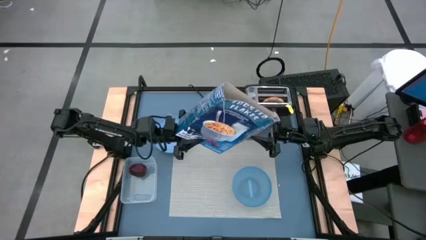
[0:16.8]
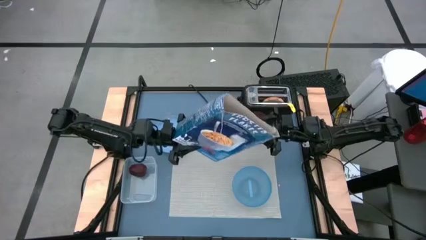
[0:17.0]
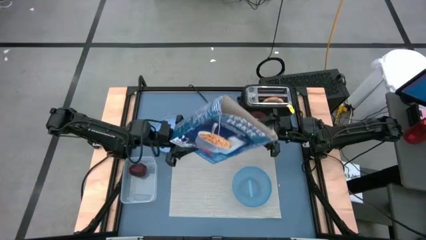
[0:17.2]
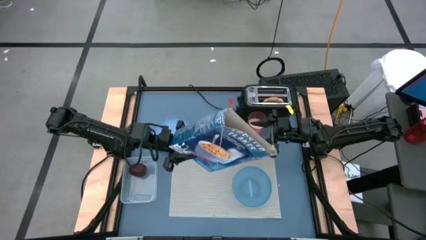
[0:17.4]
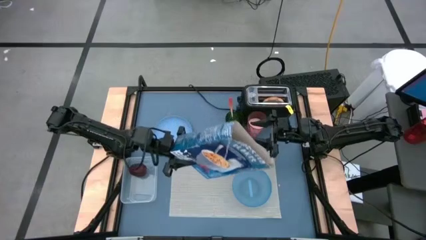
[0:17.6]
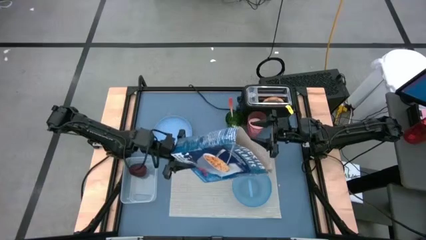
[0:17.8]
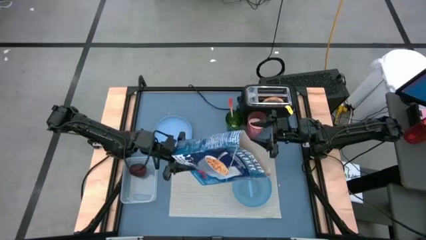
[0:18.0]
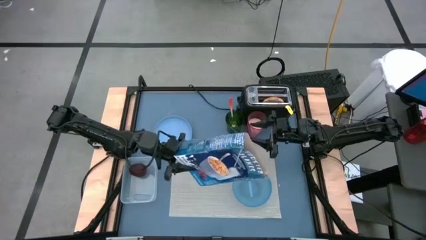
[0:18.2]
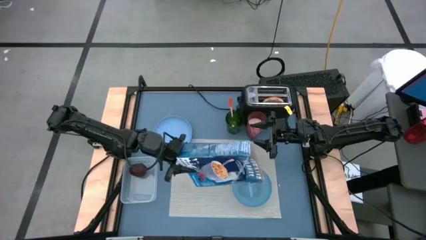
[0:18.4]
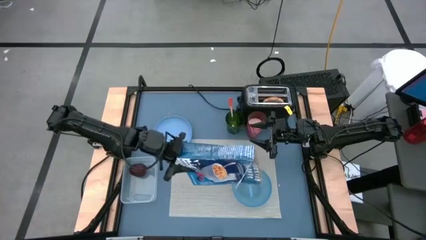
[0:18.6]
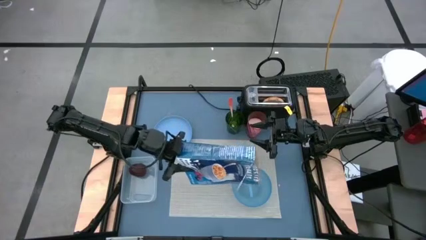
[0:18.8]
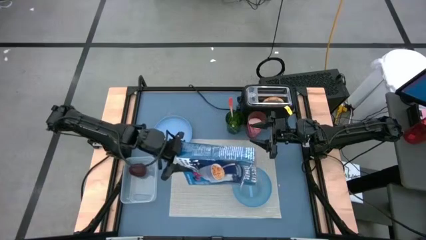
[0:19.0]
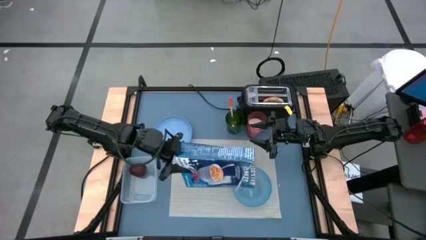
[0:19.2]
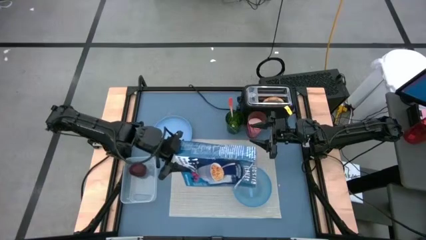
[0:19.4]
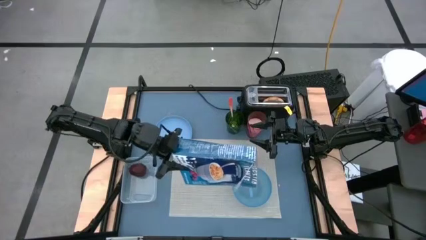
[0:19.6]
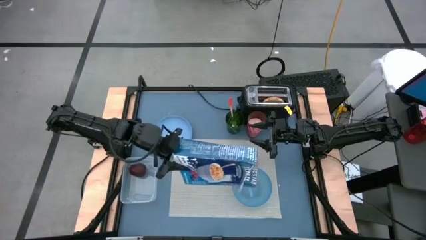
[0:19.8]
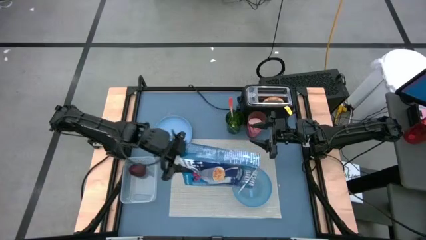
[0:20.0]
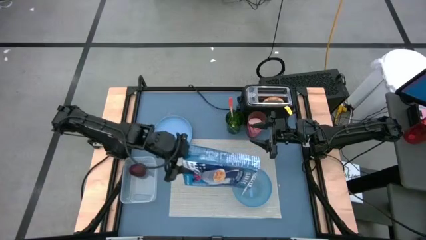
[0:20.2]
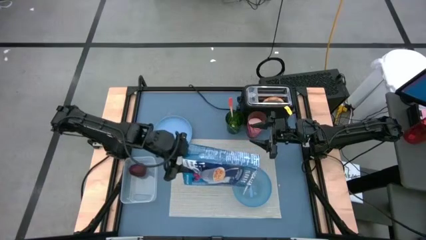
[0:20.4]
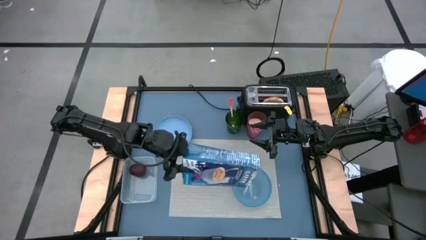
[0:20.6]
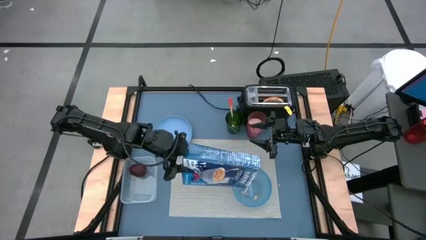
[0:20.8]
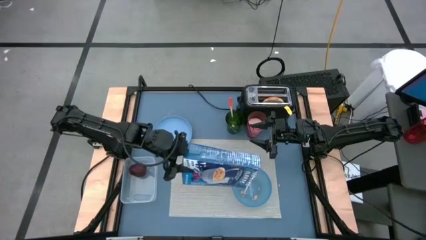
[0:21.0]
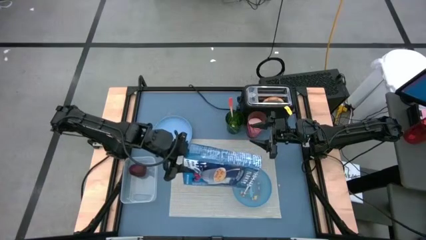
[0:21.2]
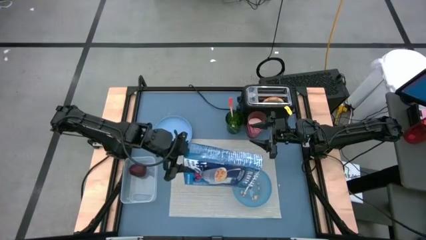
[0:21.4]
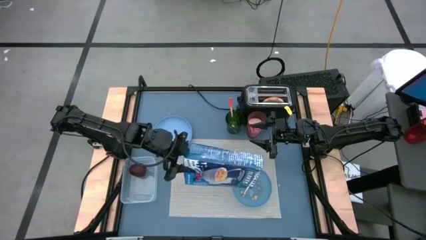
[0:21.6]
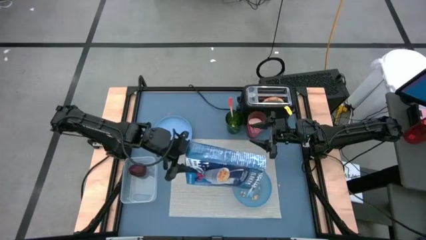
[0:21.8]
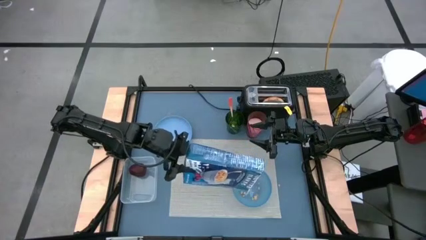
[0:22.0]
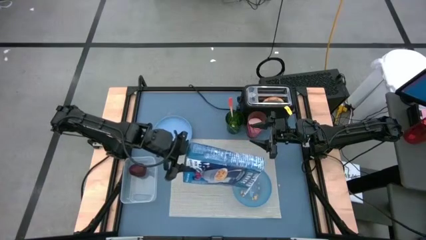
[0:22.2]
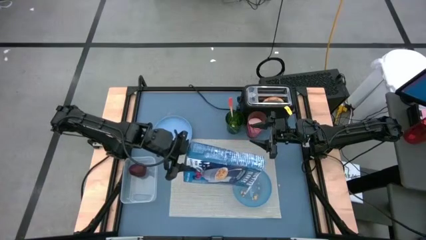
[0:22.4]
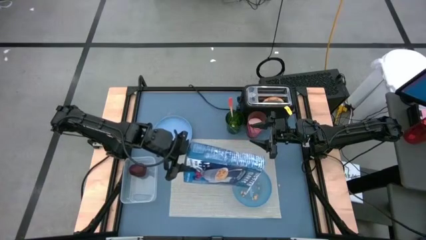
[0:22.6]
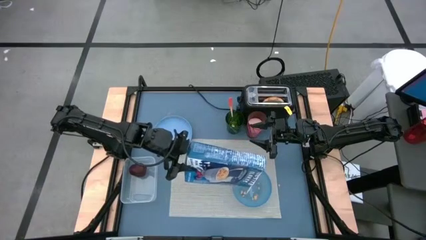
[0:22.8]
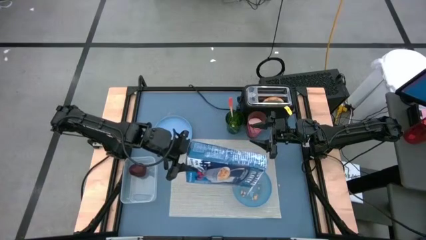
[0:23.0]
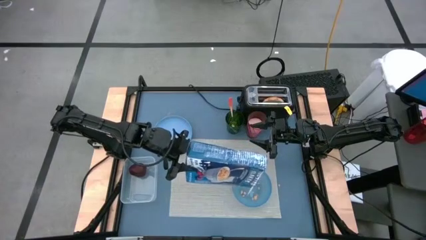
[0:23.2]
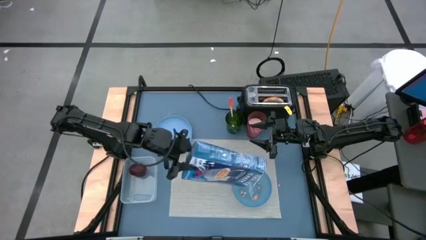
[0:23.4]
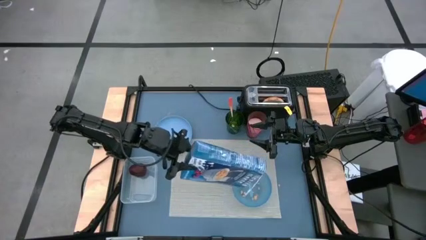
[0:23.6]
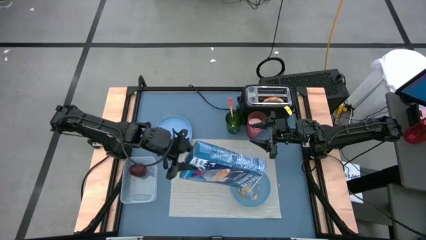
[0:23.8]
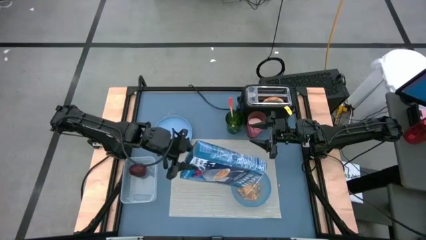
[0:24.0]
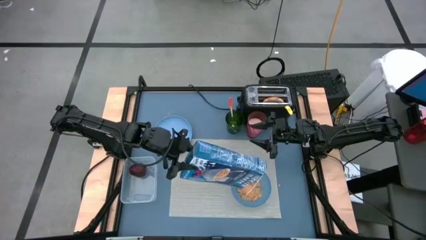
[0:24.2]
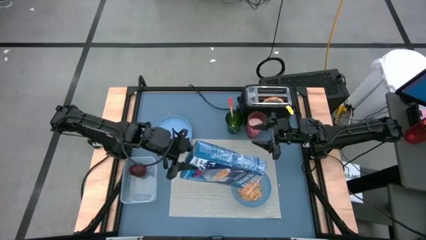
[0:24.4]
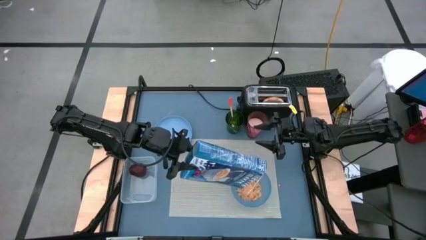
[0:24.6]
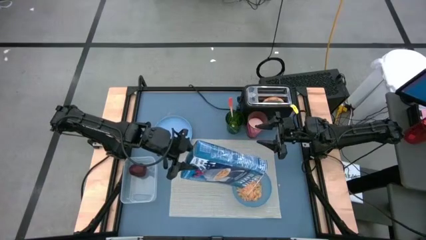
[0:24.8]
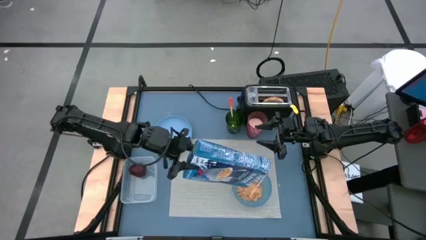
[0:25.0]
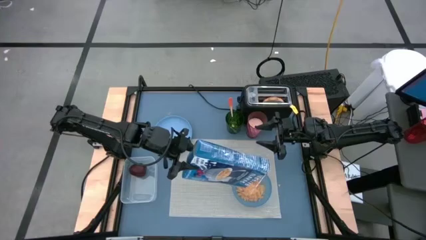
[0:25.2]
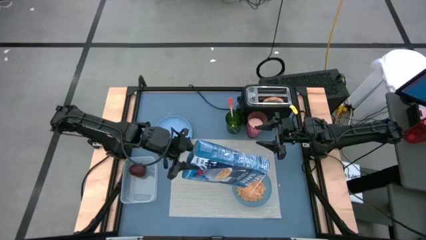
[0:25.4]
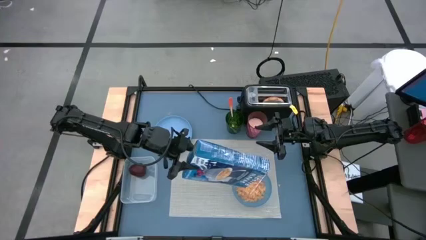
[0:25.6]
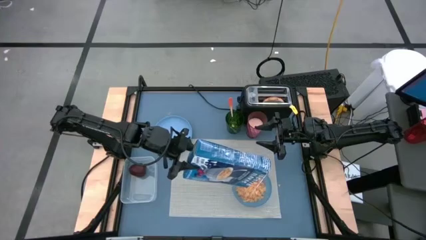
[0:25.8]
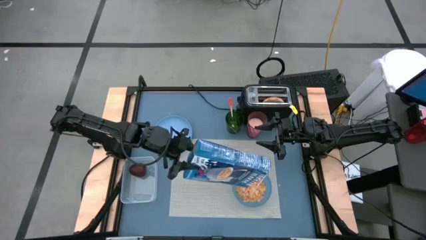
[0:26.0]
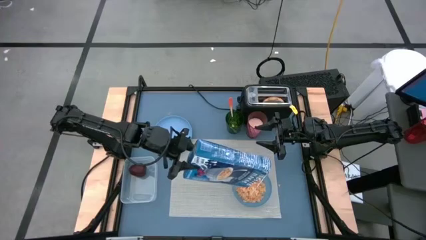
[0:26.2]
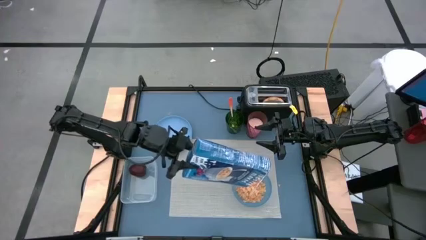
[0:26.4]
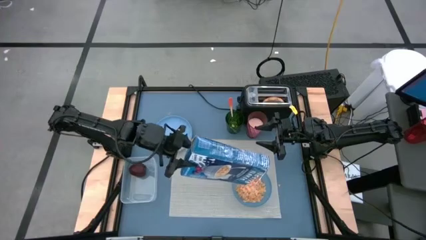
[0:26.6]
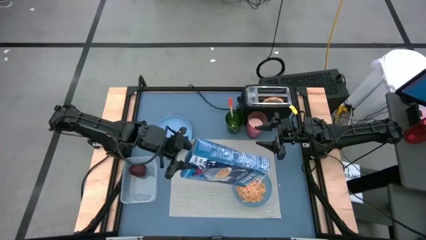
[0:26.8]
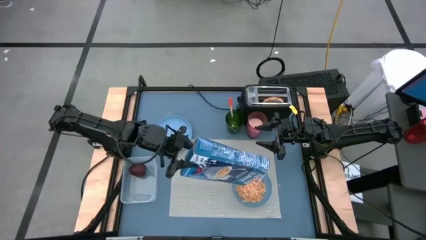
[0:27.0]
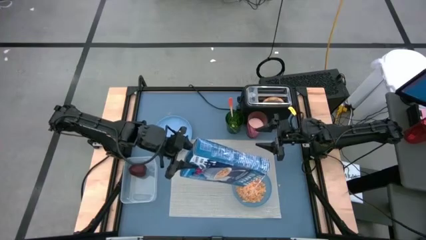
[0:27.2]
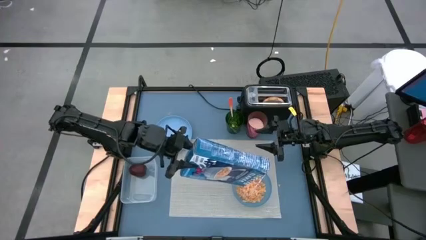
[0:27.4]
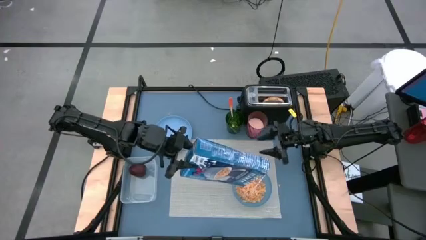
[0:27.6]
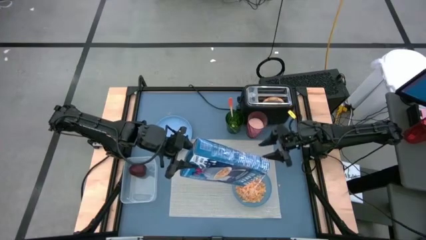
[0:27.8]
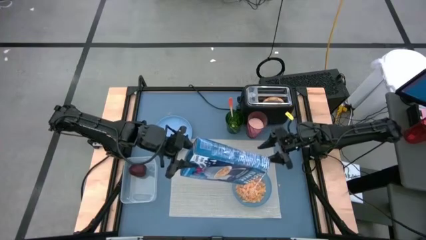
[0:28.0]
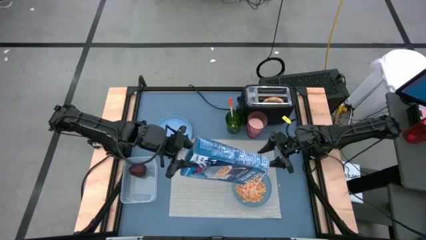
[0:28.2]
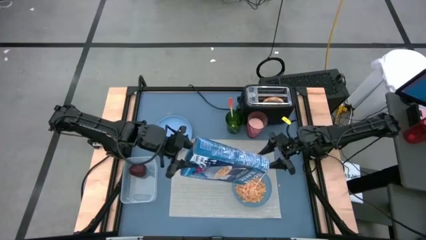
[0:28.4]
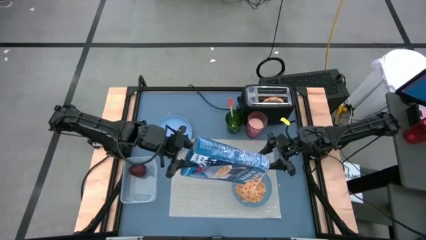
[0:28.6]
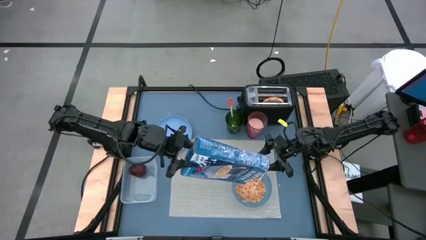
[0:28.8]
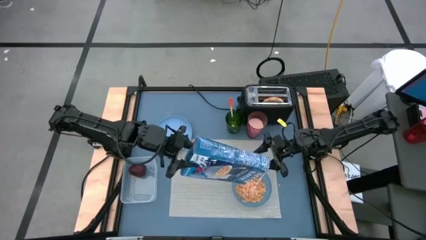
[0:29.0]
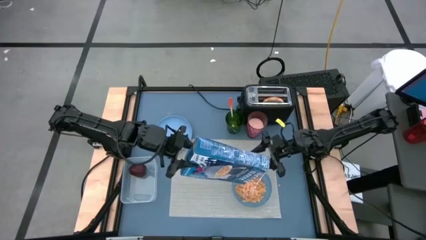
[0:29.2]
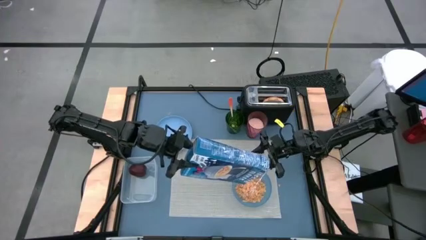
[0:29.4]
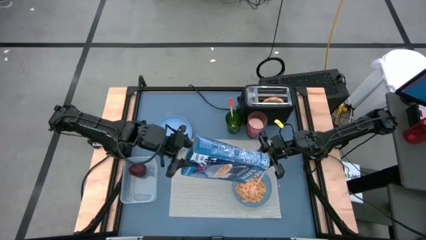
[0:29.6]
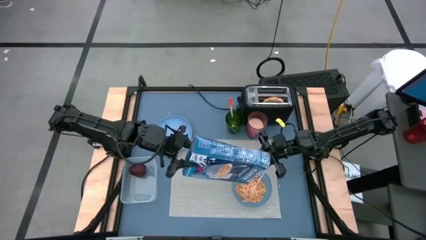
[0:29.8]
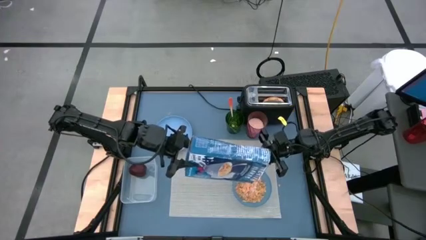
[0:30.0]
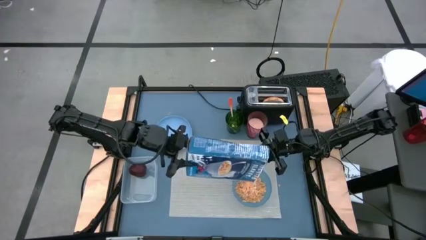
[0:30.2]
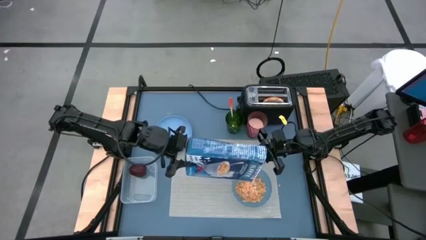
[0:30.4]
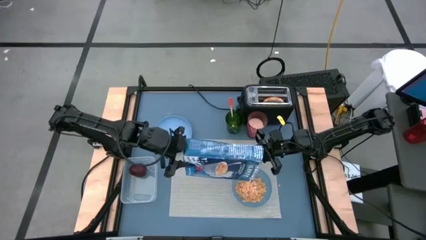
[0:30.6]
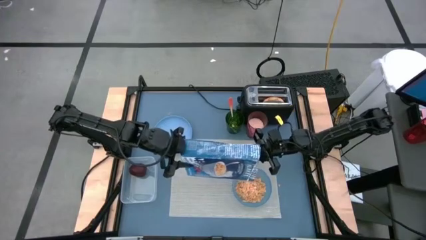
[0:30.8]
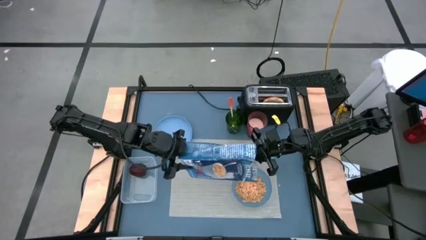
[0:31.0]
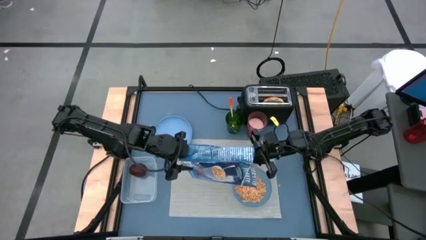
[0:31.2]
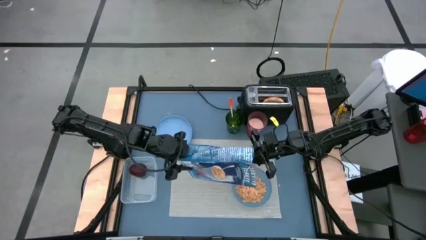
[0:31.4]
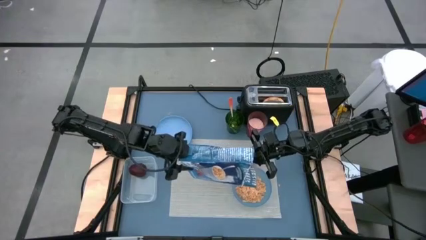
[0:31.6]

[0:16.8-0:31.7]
Task: Arrange a breakfast setting
Pour the cereal into the blue bowl
